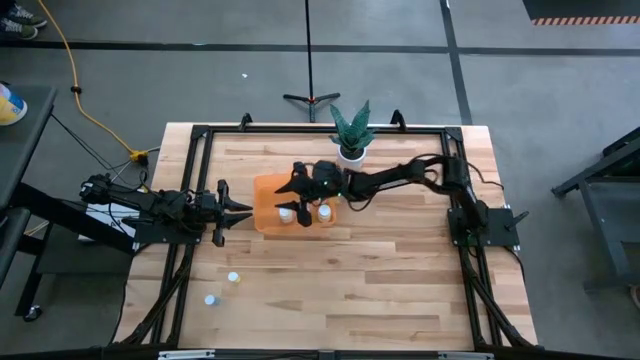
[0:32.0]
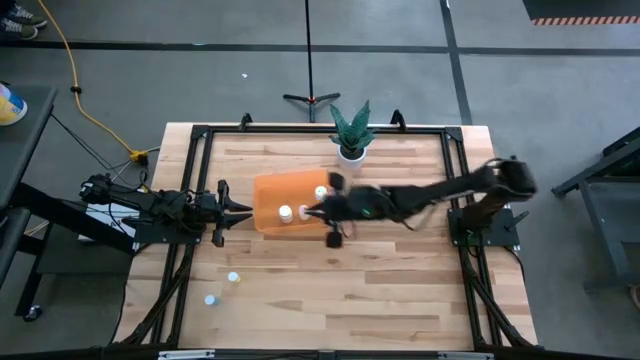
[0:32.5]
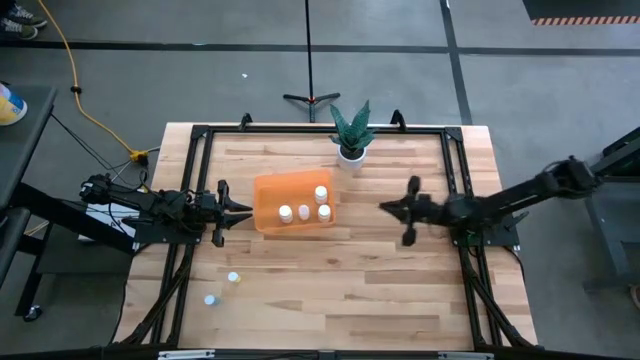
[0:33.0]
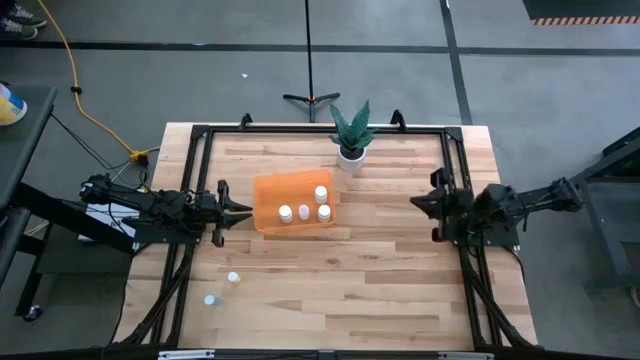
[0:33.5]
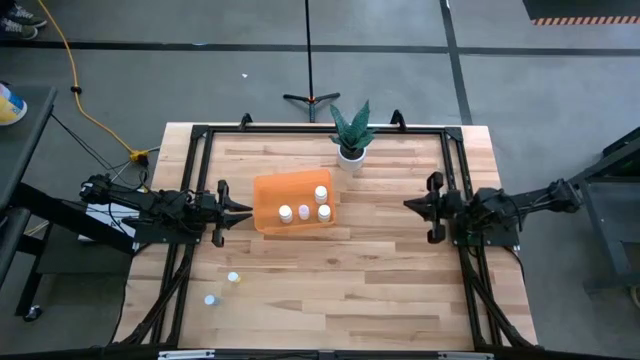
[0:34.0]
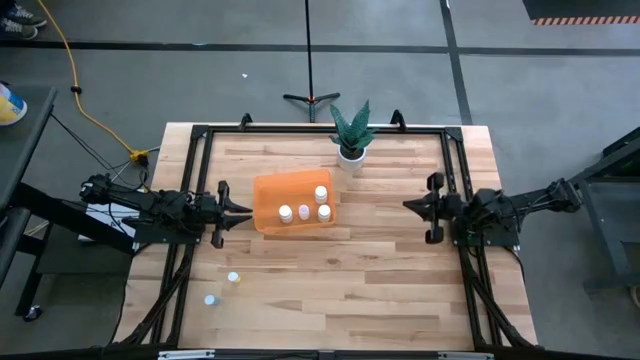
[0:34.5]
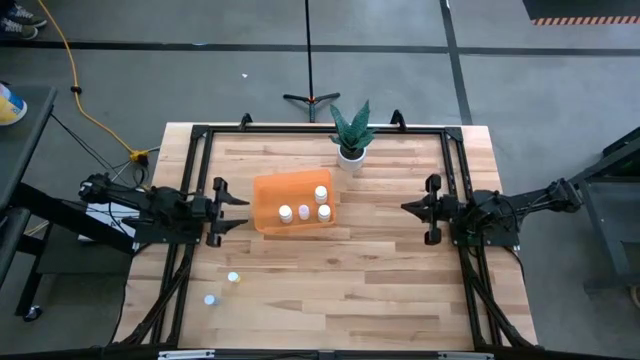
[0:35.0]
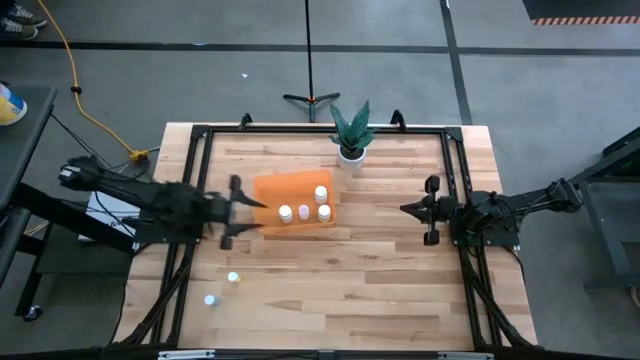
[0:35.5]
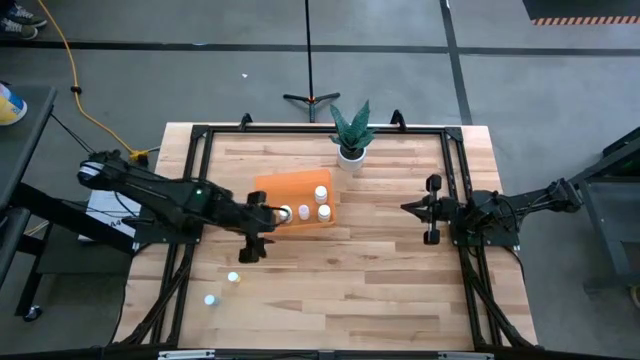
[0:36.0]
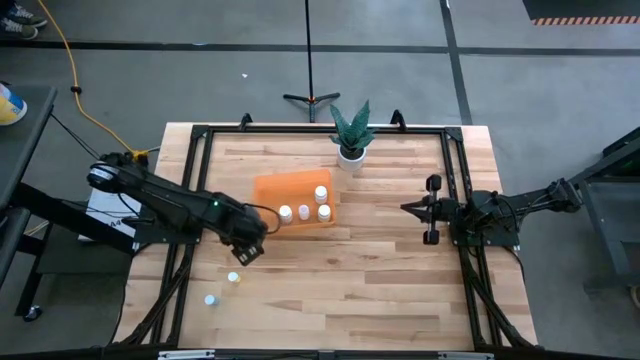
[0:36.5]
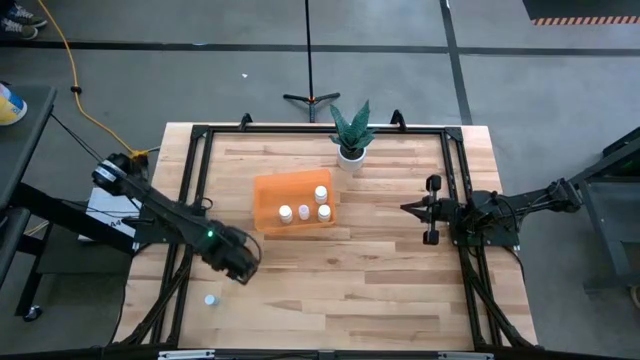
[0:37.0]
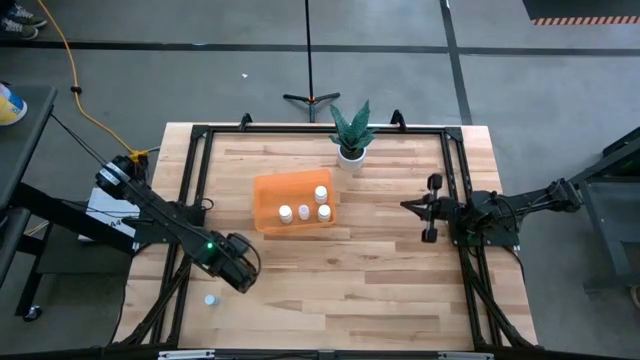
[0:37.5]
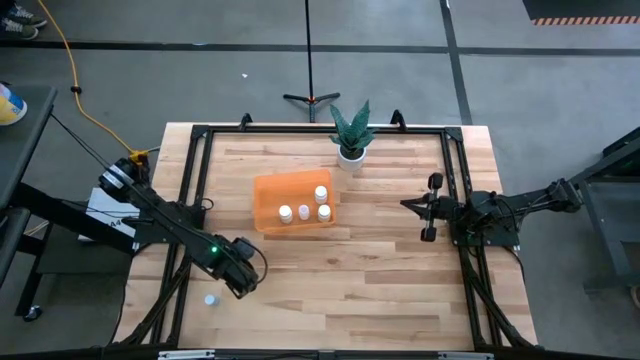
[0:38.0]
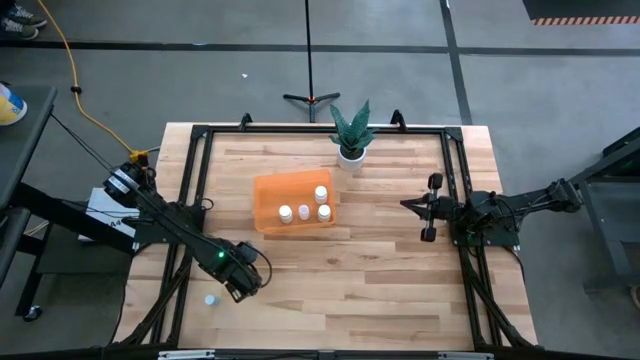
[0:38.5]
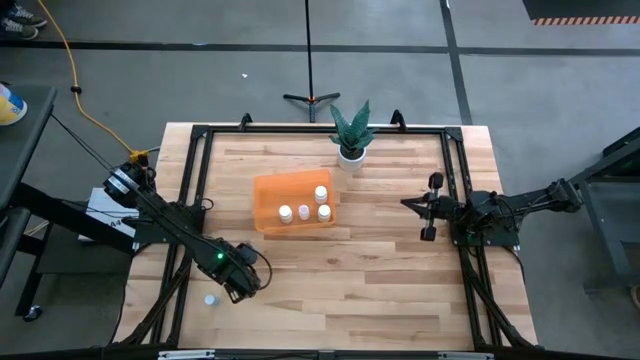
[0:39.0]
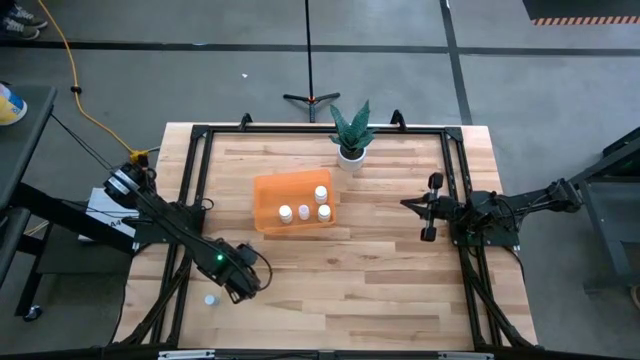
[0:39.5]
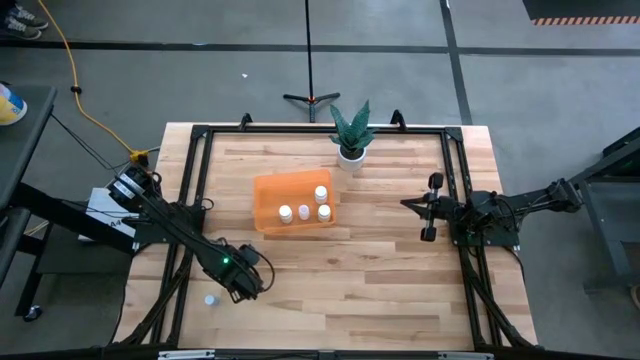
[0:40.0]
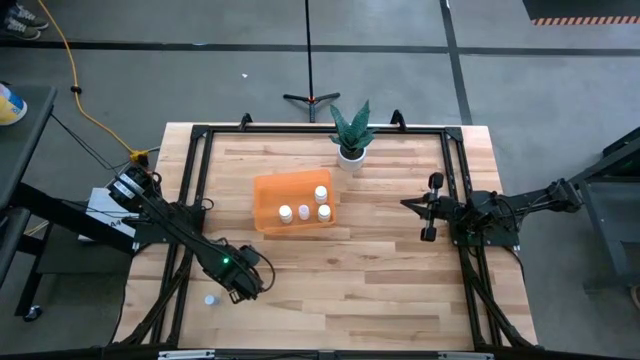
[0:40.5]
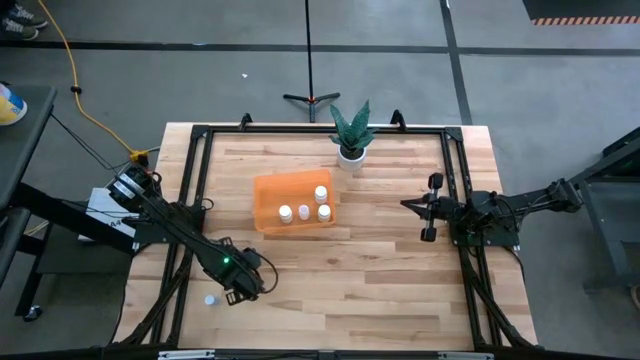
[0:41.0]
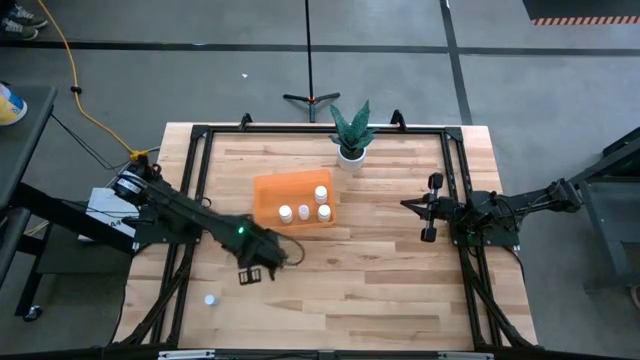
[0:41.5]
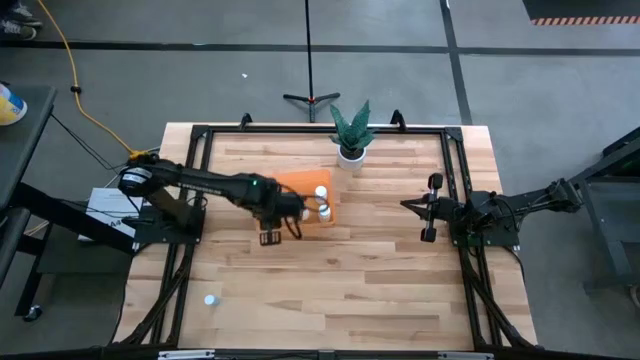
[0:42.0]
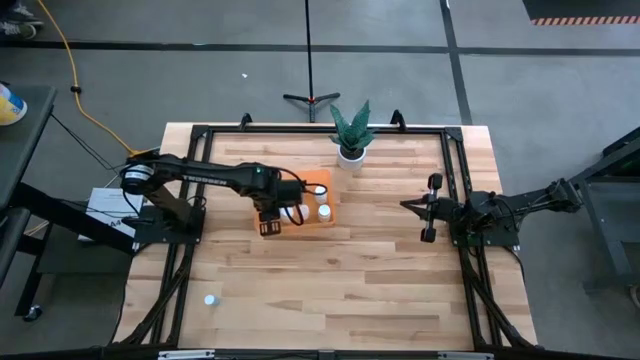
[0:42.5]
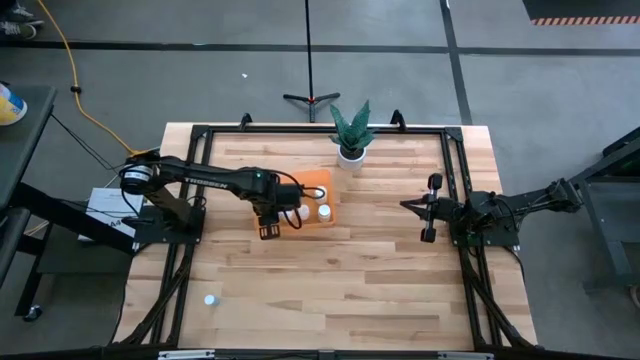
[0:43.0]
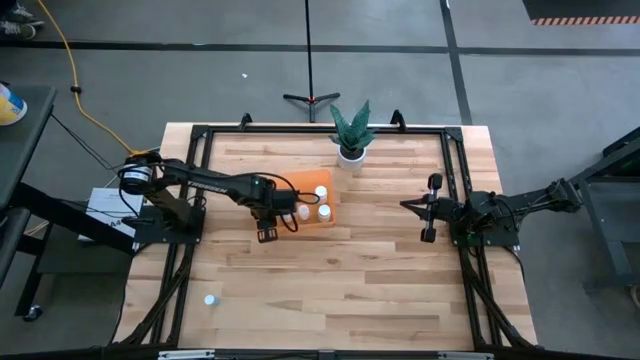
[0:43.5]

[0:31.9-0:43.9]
Task: Pick and place pill bottles into a basket
Put the yellow pill bottle in the orange bin

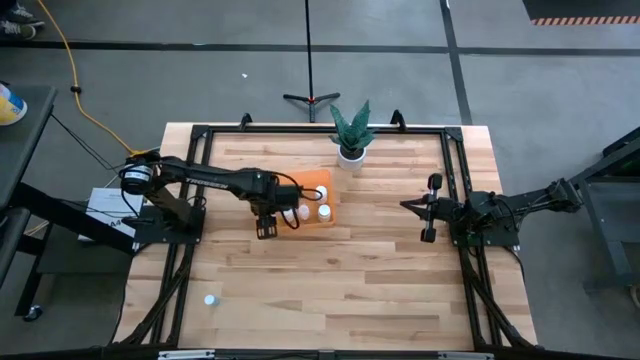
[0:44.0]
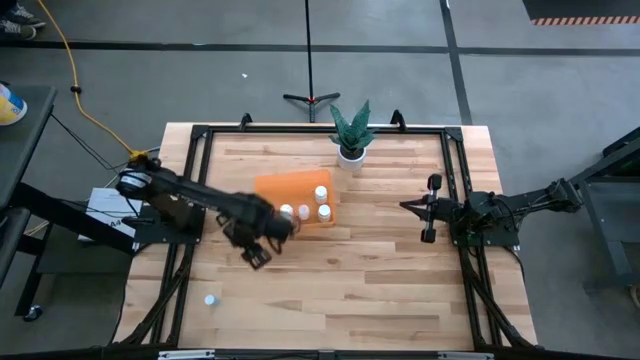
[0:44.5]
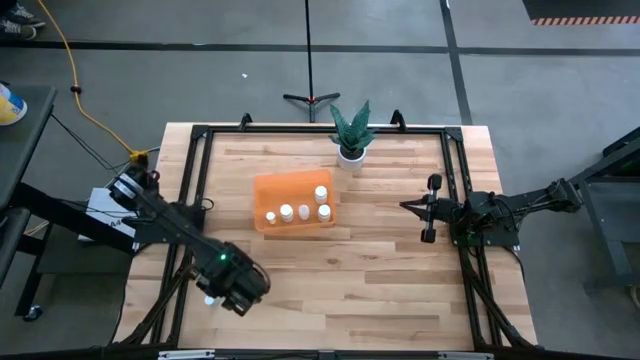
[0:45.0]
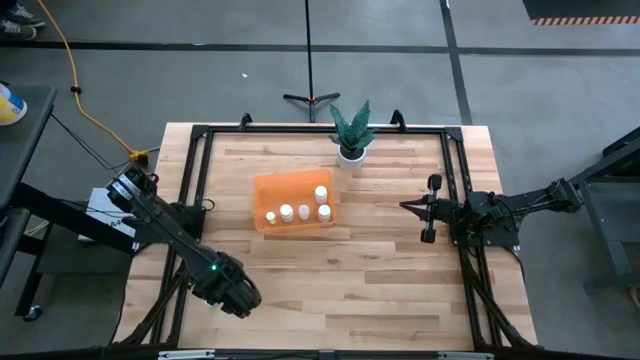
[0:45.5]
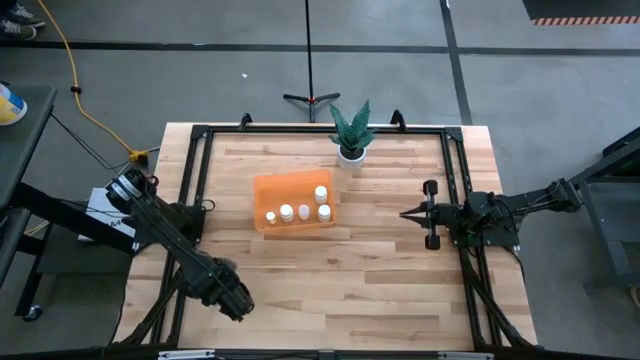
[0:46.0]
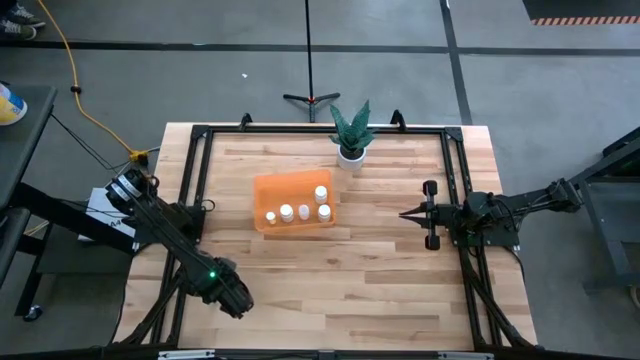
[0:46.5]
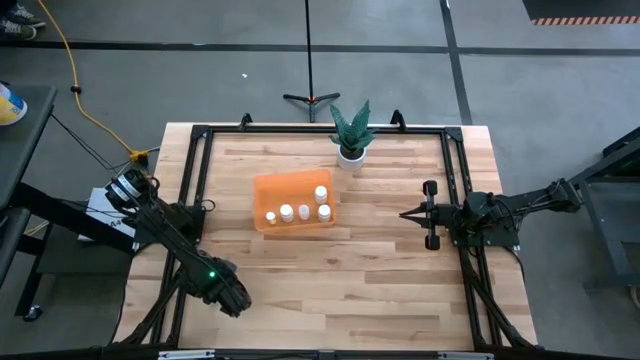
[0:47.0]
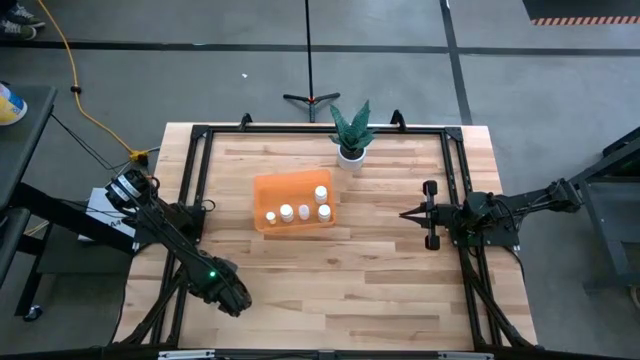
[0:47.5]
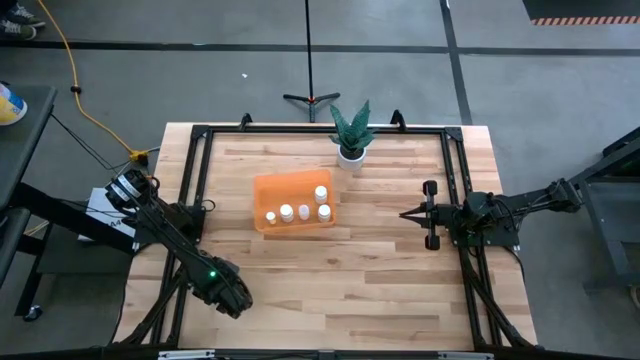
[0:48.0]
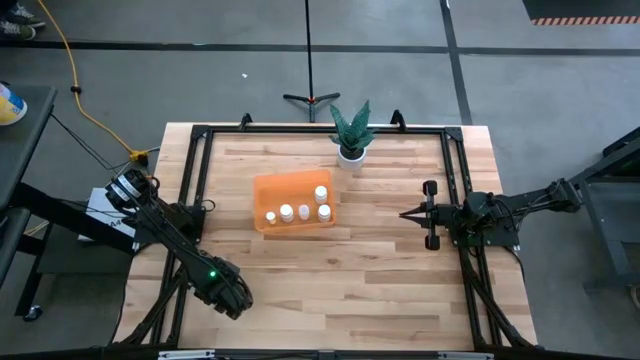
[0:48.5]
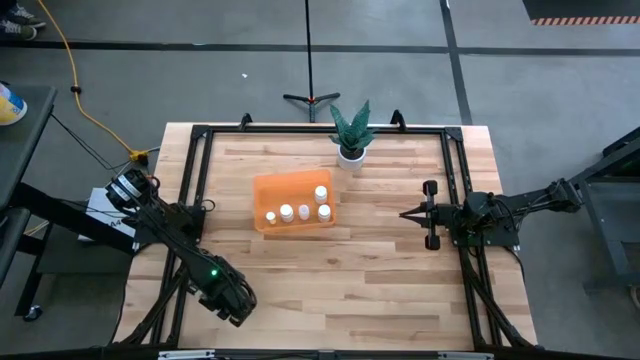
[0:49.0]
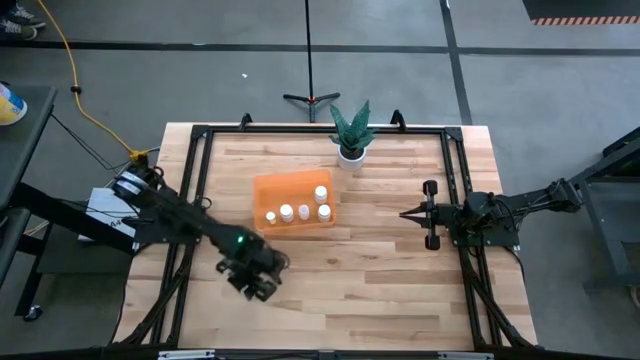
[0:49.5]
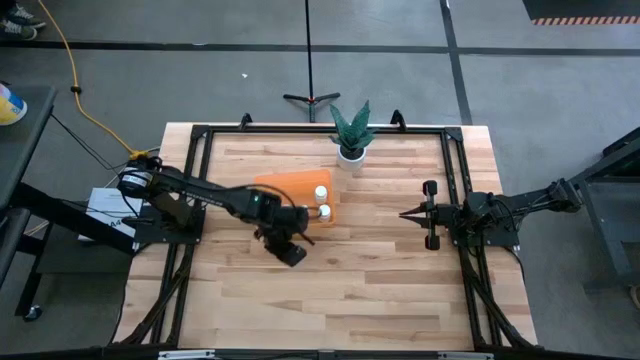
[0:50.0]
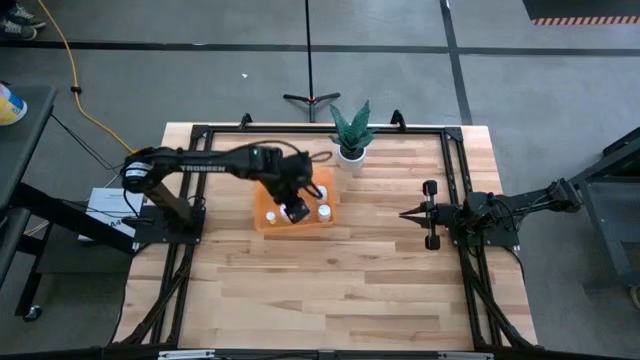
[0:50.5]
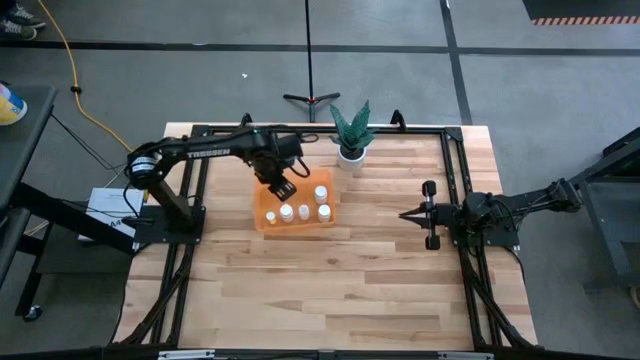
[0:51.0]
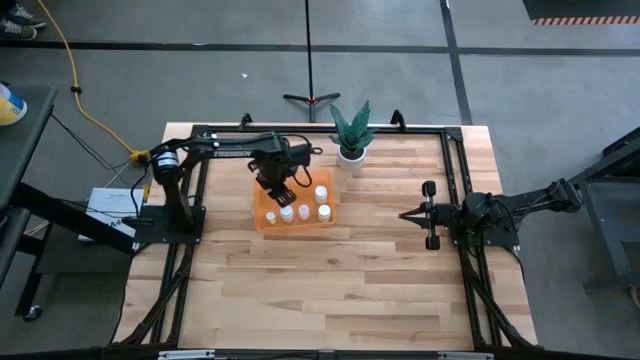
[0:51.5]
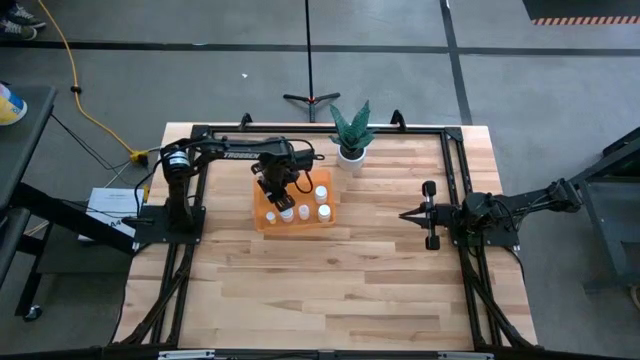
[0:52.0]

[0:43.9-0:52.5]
Put the blue pill bottle in the orange bin

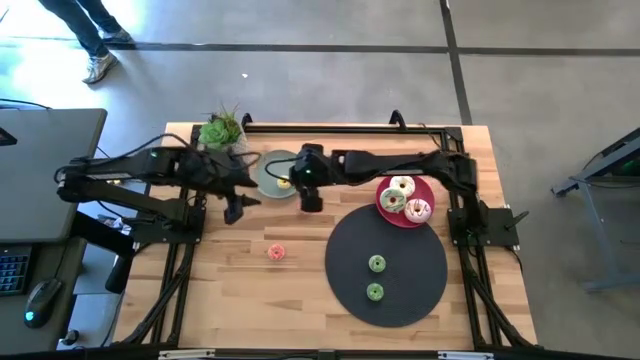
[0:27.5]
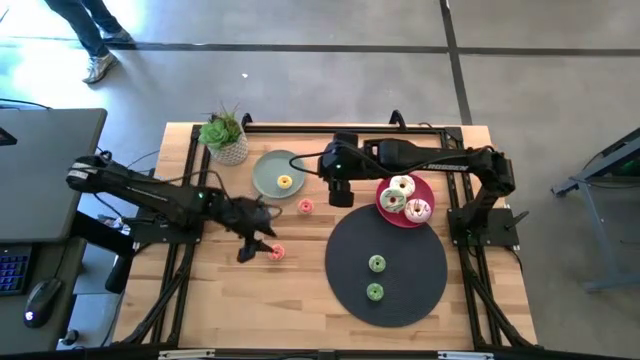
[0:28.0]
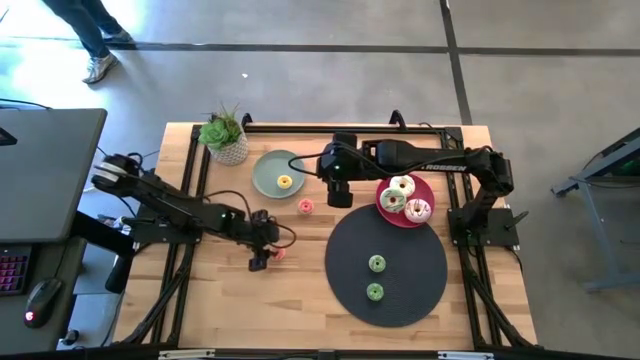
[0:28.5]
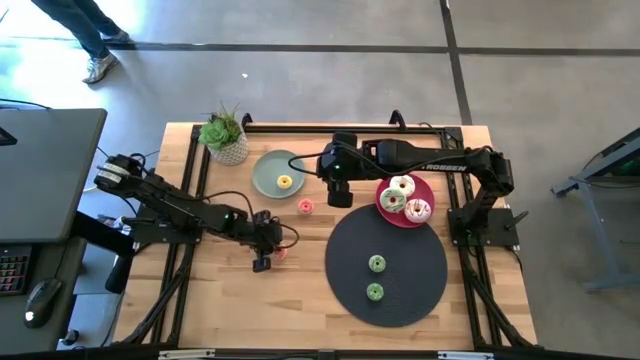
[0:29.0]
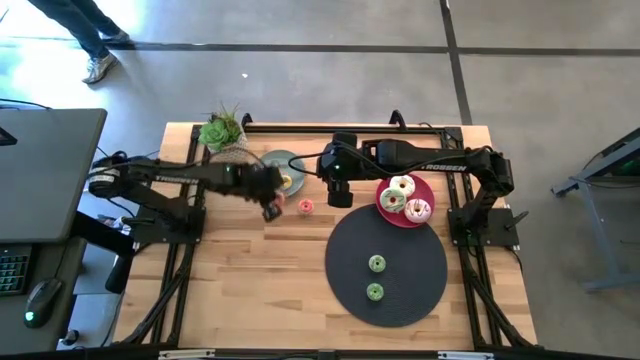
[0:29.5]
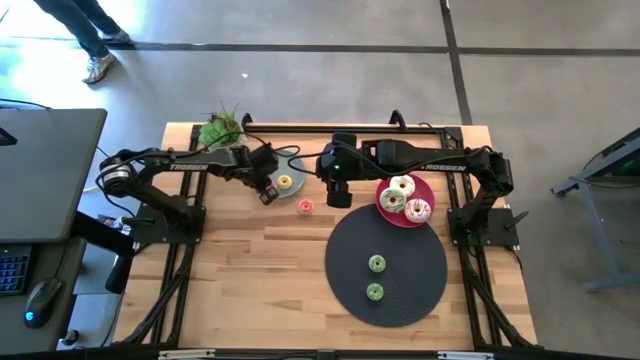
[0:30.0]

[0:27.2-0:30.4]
Task: Pick & Place donuts
Put the bottom pink donut on the gray plate
